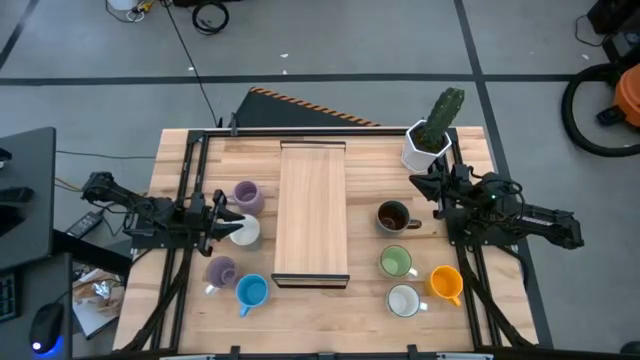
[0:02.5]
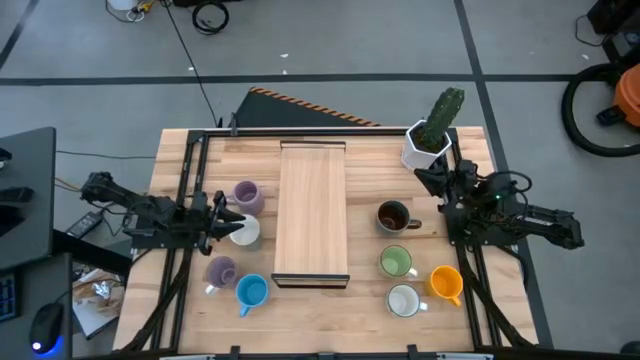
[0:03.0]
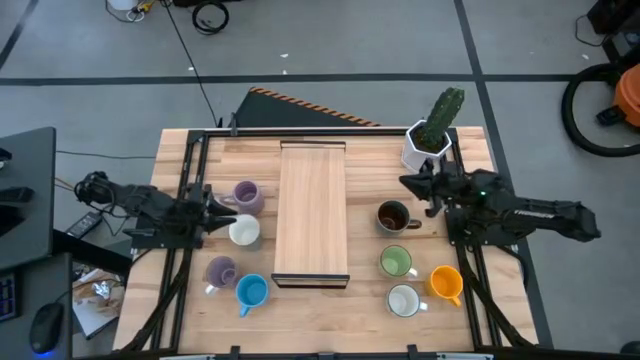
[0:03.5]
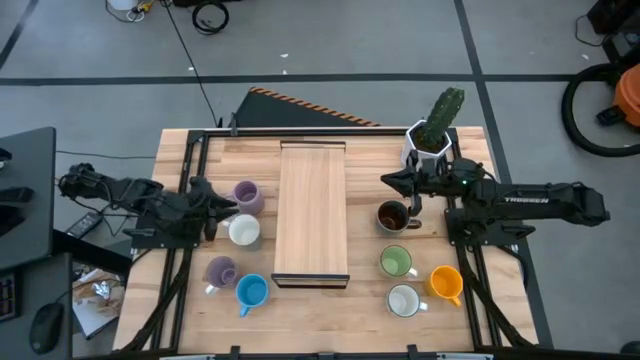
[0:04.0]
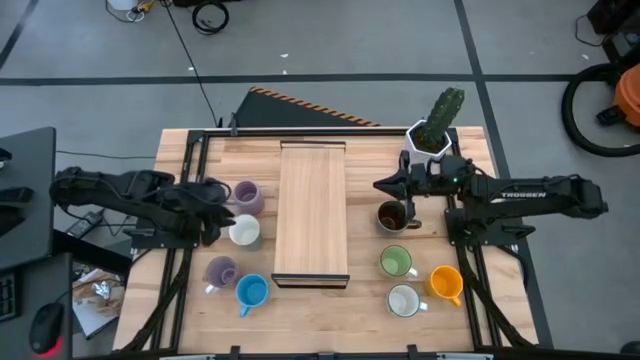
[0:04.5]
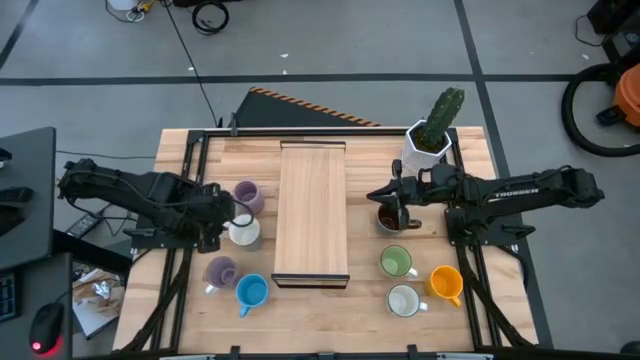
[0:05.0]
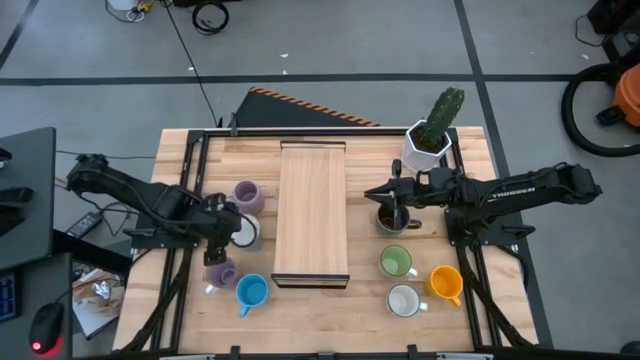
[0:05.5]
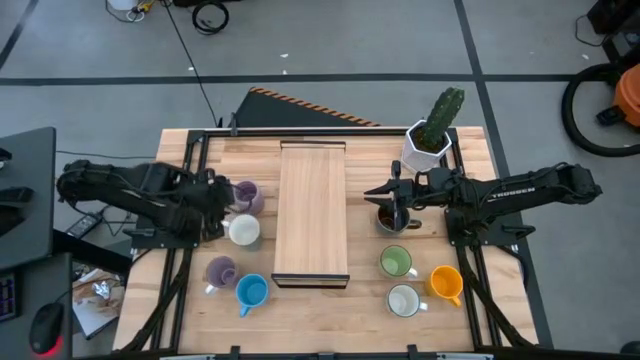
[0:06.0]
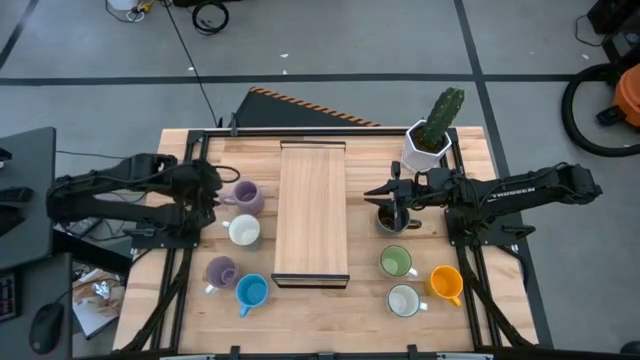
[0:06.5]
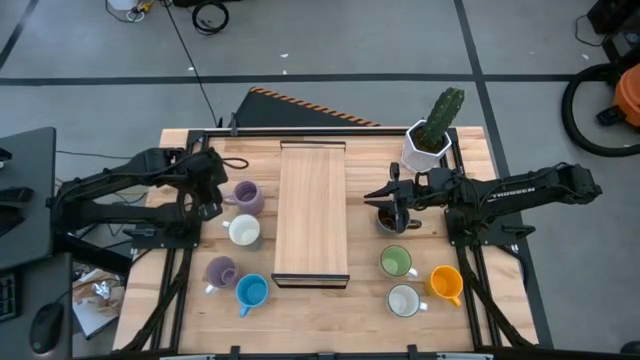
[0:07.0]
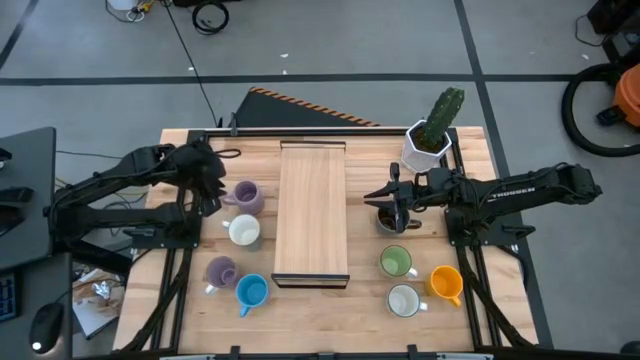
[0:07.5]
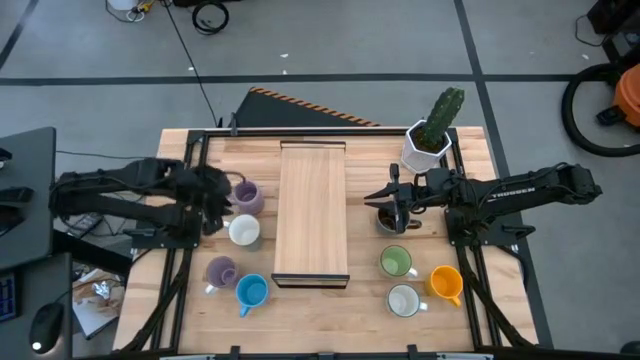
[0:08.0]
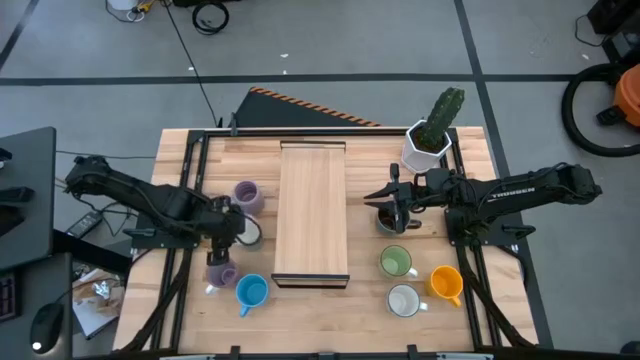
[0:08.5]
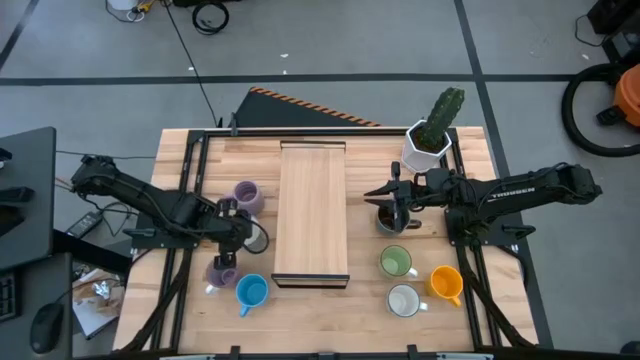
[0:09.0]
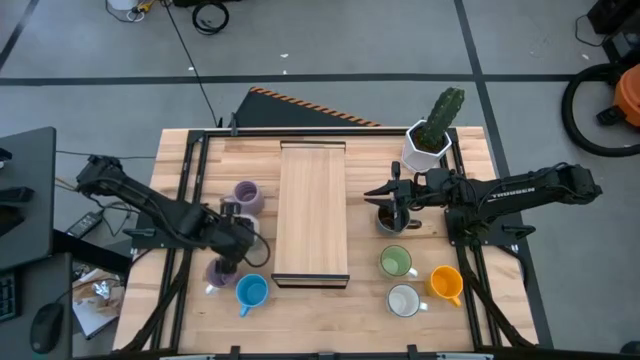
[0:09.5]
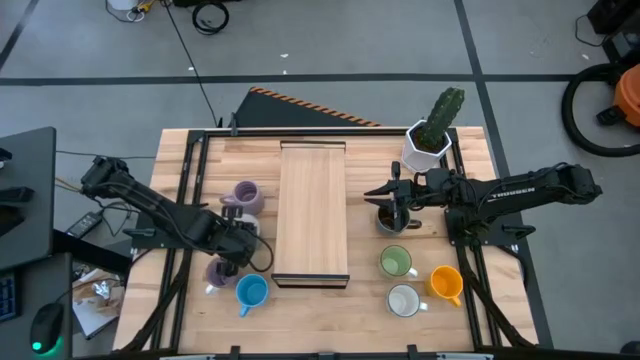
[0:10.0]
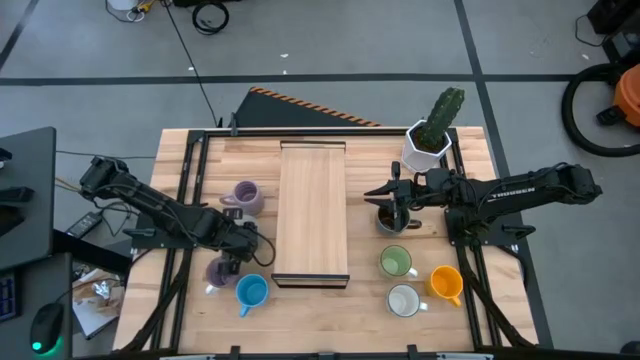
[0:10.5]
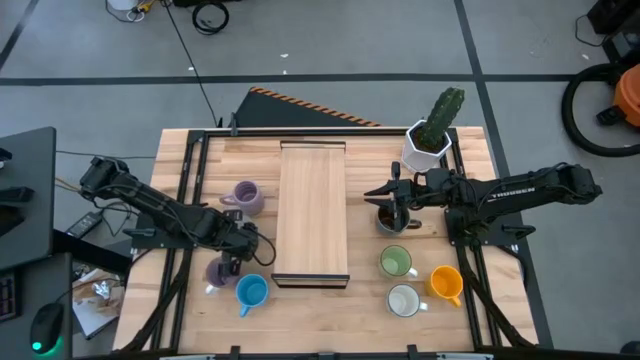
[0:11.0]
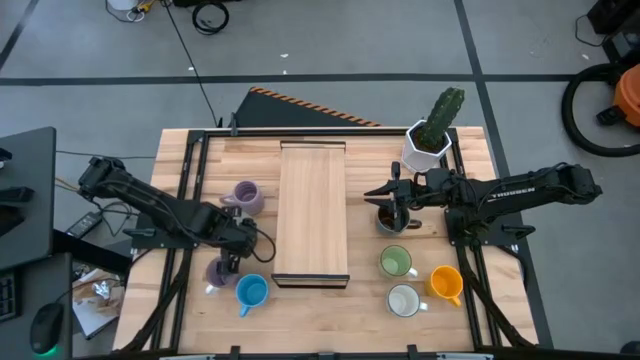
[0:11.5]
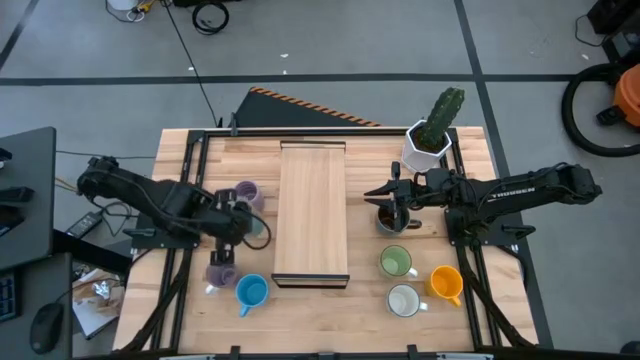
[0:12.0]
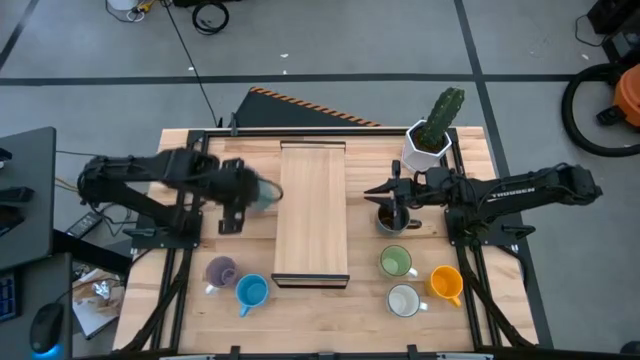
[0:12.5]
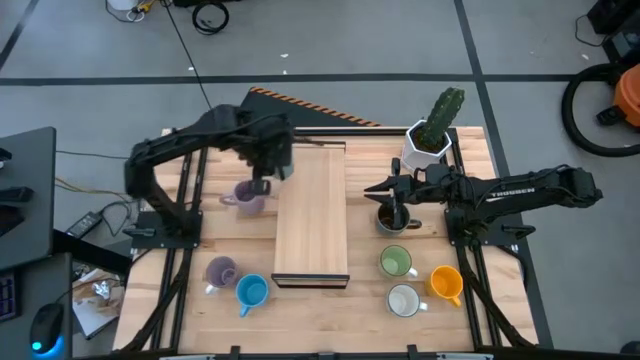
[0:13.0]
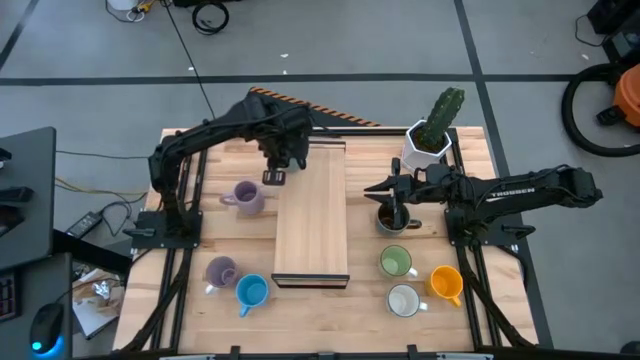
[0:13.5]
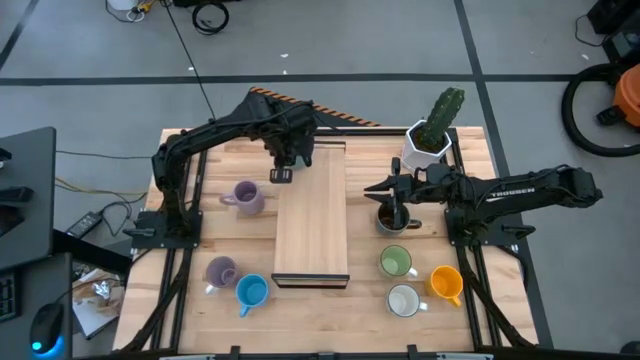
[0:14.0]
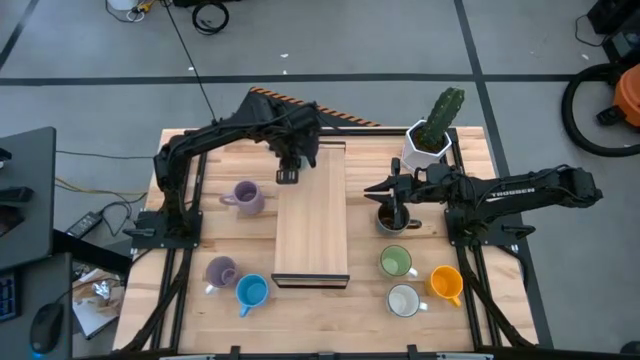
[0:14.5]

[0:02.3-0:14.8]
Task: Place coffee mugs
Put the light blue mug on the shelf

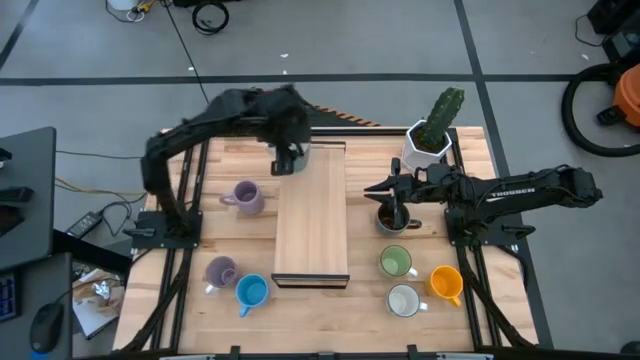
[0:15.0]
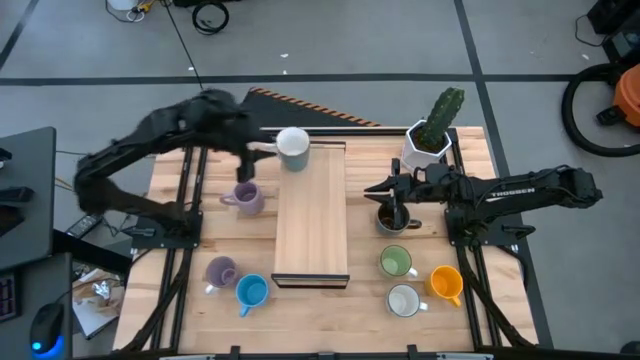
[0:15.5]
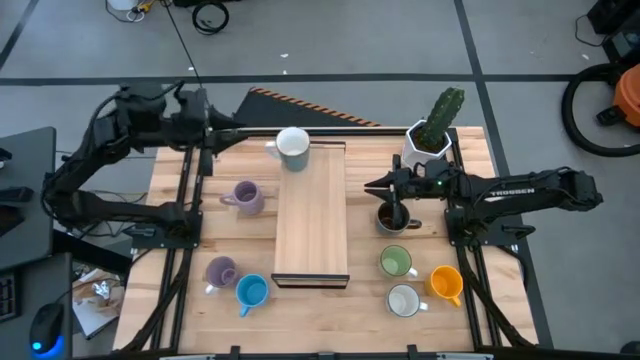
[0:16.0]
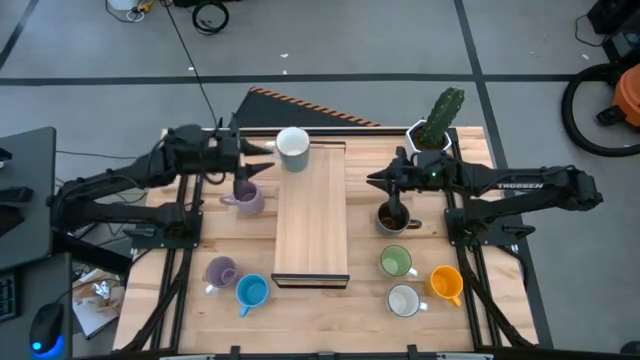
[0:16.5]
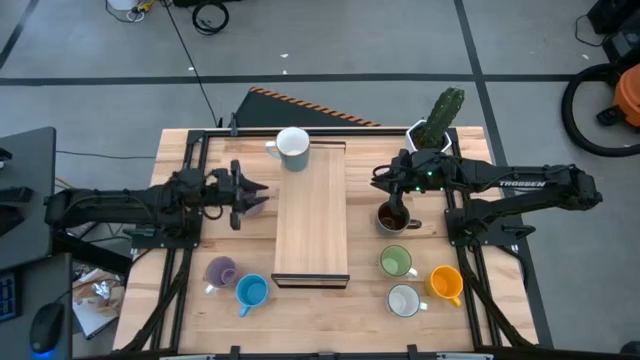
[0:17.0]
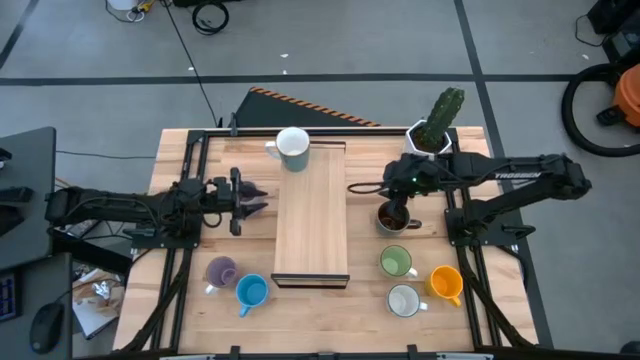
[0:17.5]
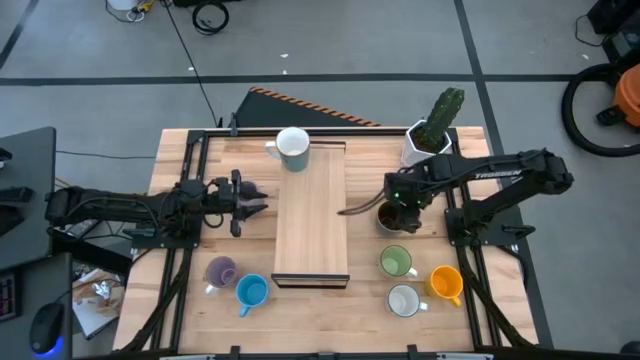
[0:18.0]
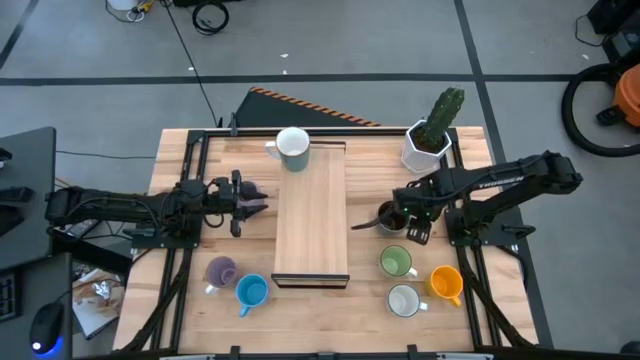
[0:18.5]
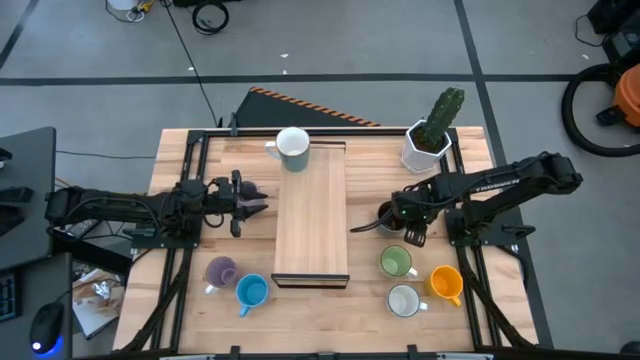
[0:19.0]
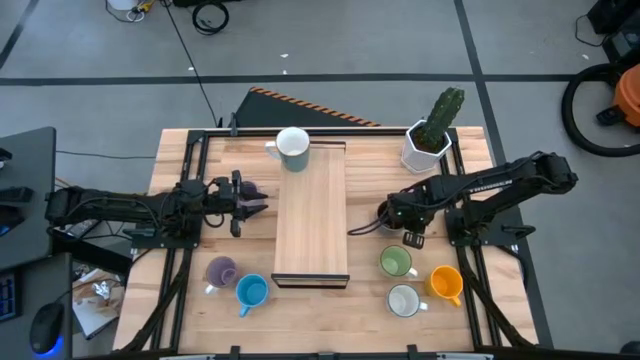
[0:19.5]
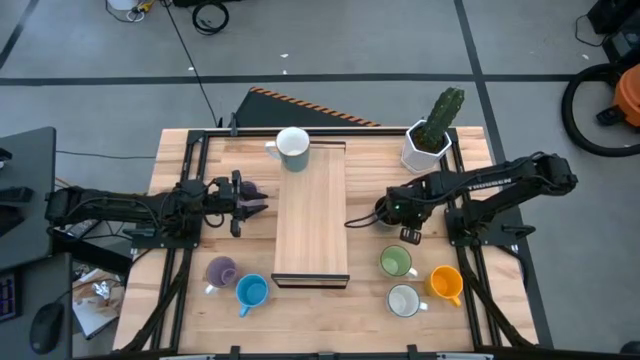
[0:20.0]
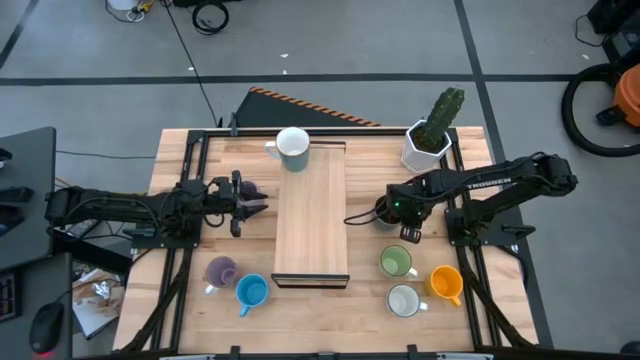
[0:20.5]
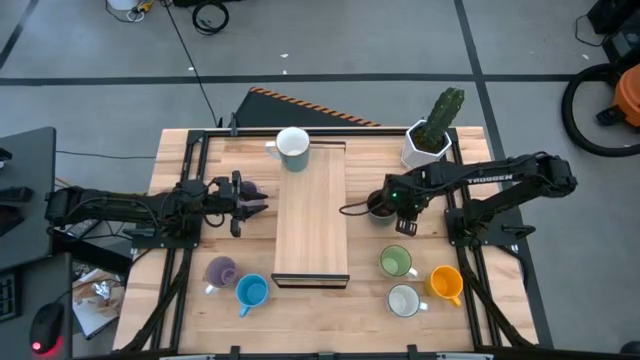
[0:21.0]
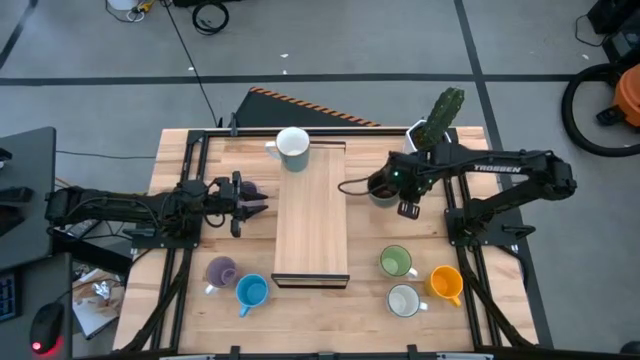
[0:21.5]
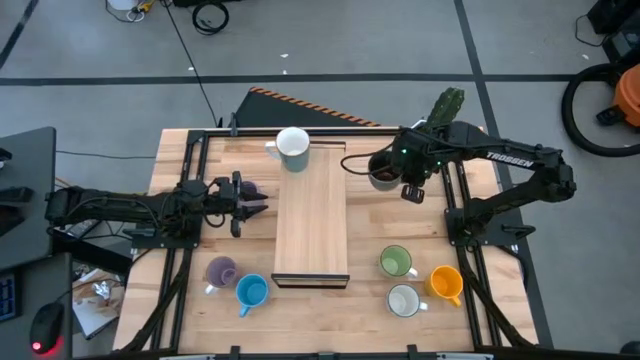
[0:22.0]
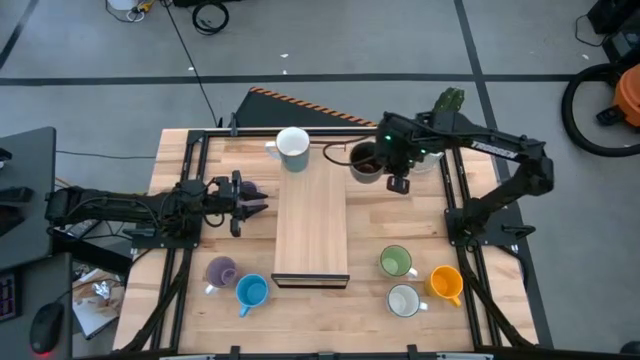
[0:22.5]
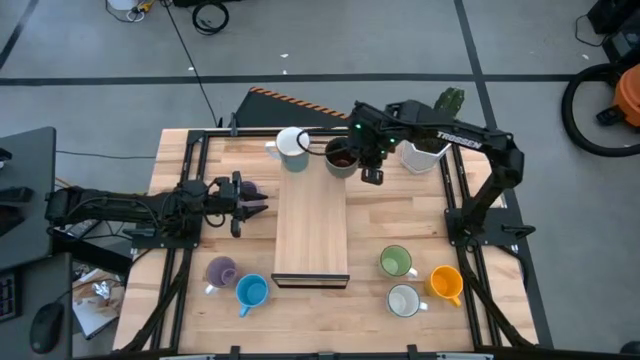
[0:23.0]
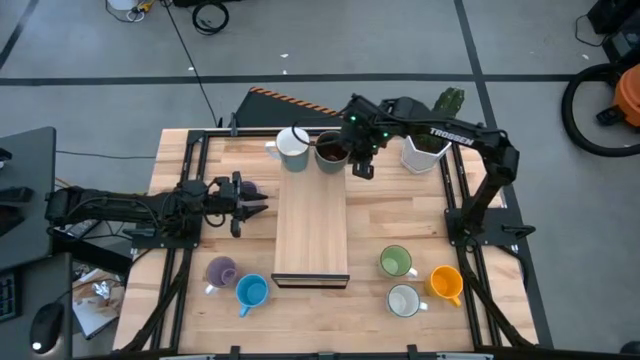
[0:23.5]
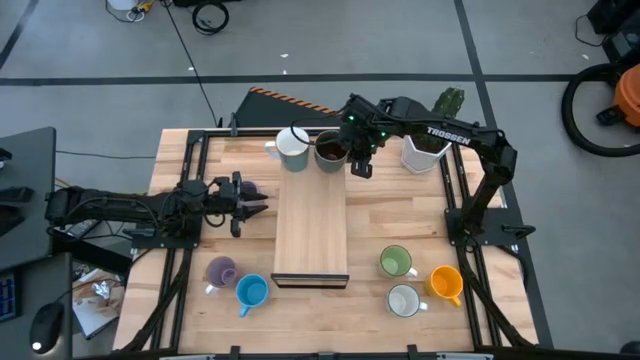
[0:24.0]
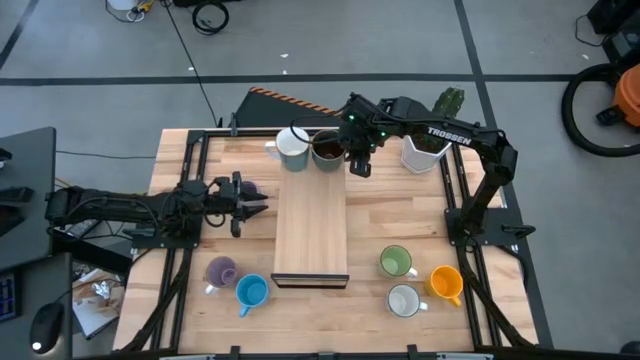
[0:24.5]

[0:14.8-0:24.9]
Put the dark blue mug on the shelf
